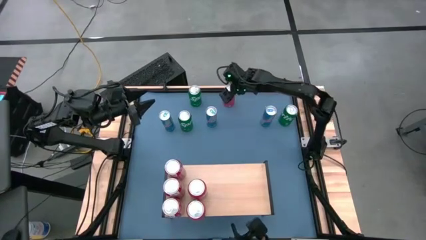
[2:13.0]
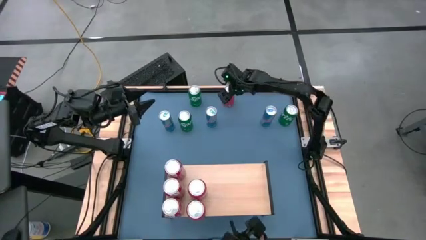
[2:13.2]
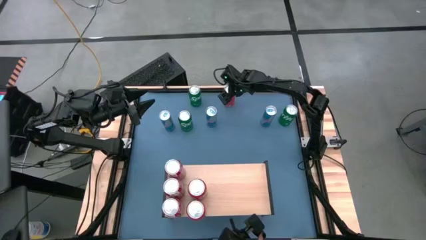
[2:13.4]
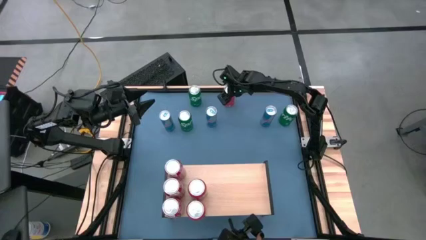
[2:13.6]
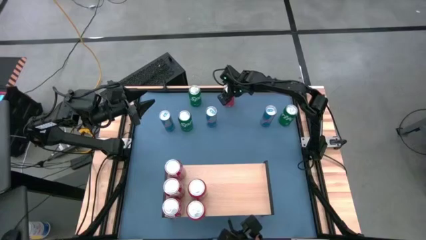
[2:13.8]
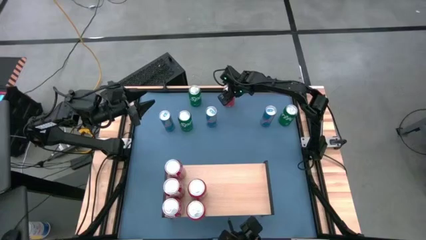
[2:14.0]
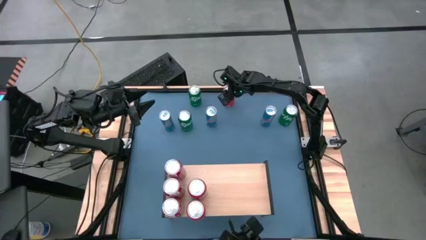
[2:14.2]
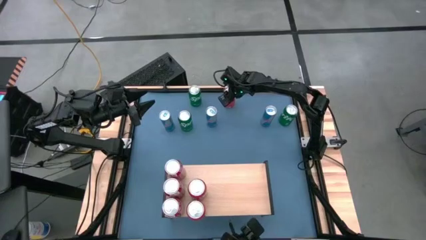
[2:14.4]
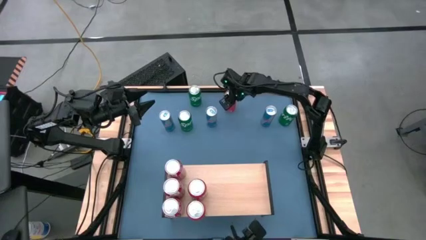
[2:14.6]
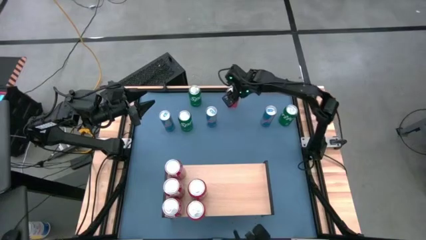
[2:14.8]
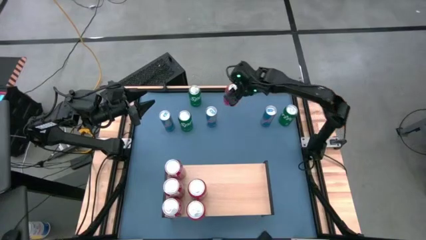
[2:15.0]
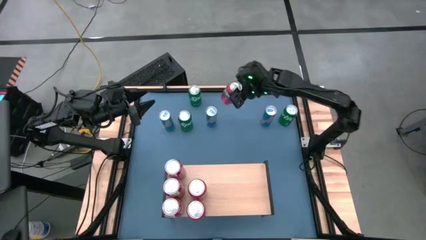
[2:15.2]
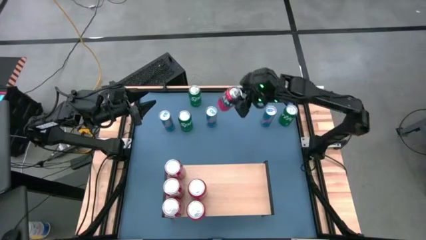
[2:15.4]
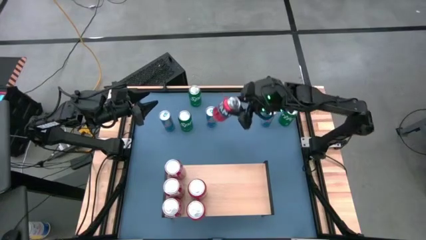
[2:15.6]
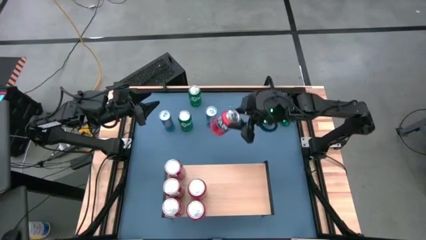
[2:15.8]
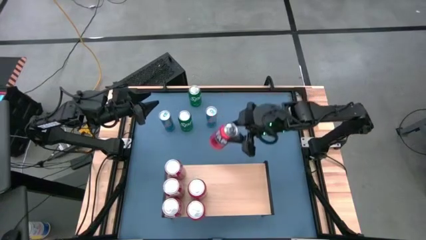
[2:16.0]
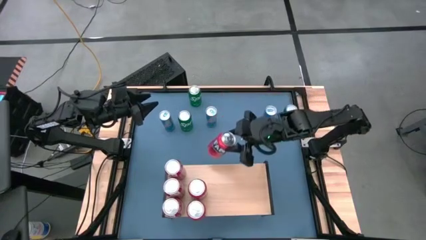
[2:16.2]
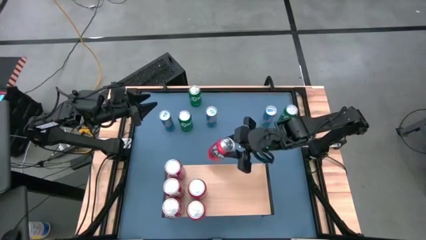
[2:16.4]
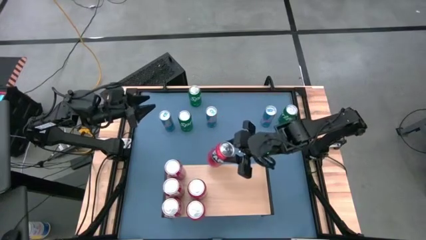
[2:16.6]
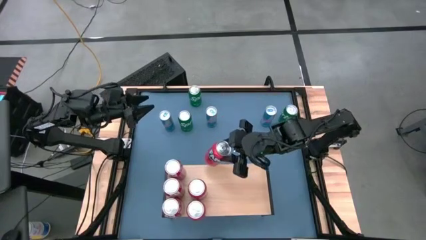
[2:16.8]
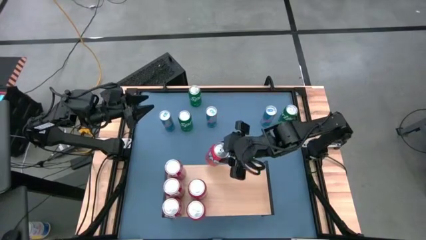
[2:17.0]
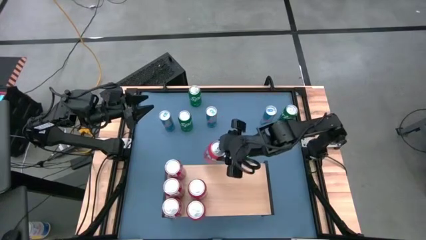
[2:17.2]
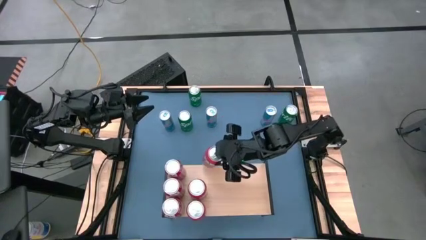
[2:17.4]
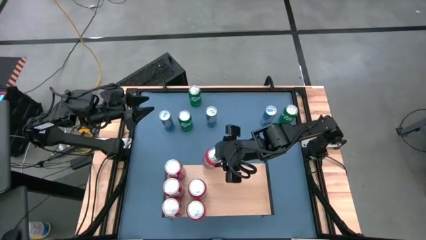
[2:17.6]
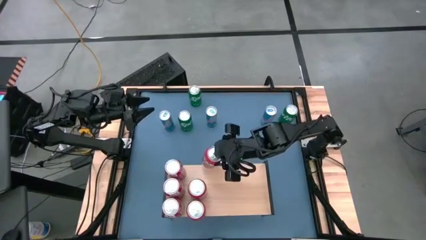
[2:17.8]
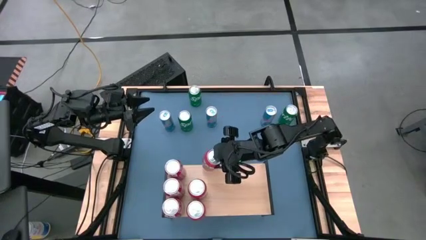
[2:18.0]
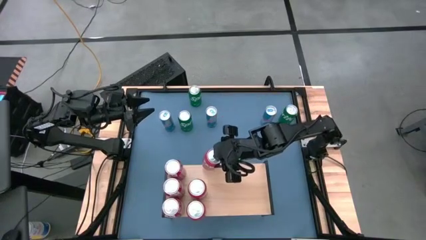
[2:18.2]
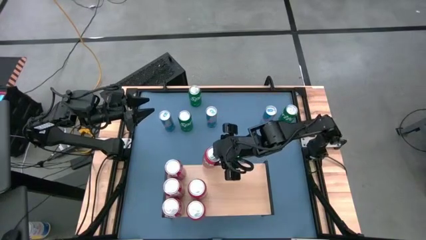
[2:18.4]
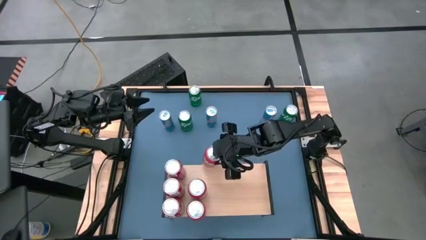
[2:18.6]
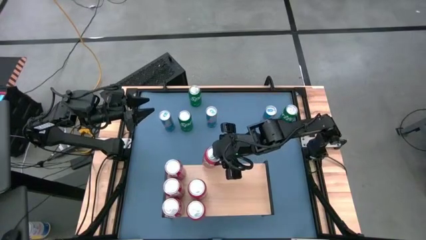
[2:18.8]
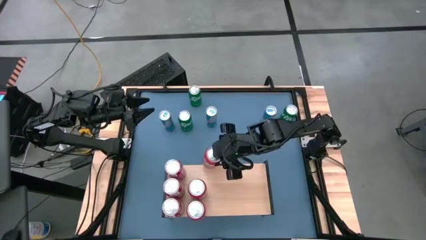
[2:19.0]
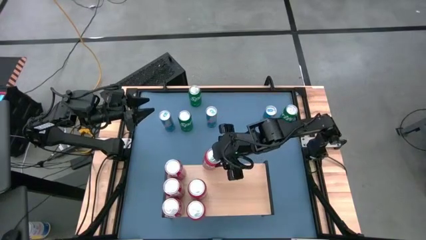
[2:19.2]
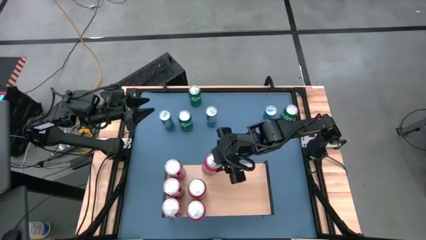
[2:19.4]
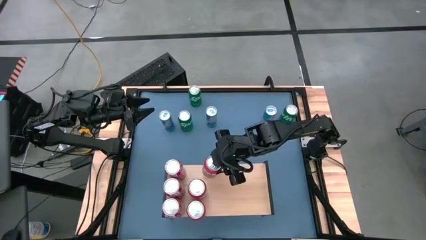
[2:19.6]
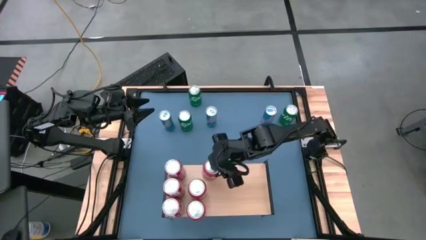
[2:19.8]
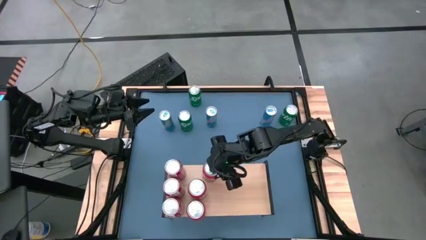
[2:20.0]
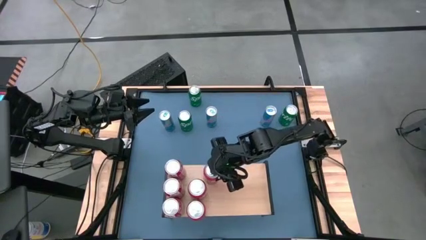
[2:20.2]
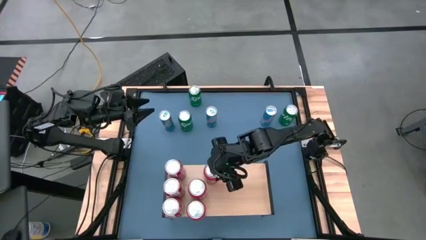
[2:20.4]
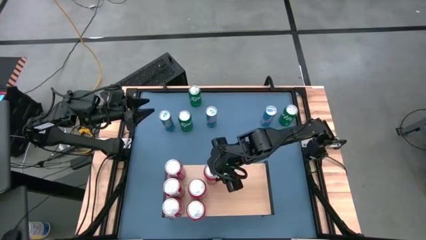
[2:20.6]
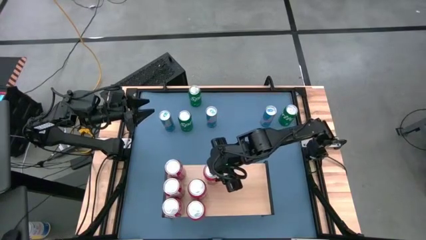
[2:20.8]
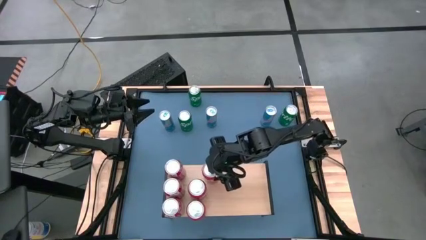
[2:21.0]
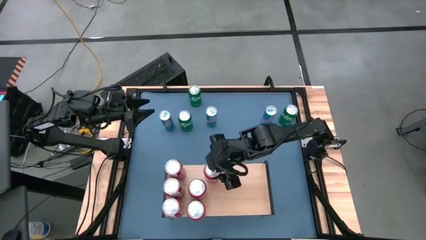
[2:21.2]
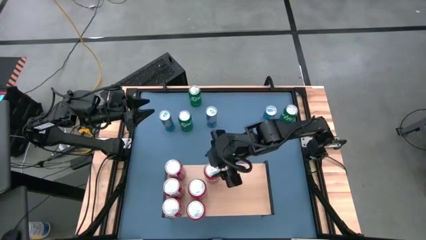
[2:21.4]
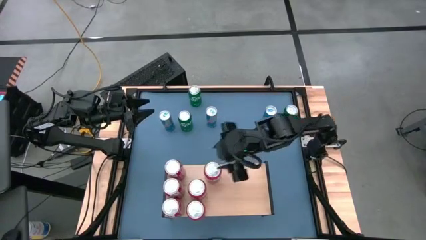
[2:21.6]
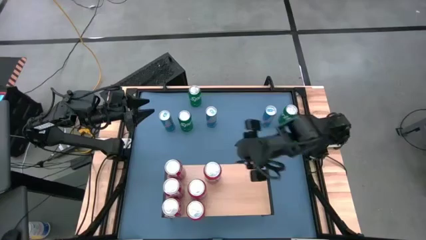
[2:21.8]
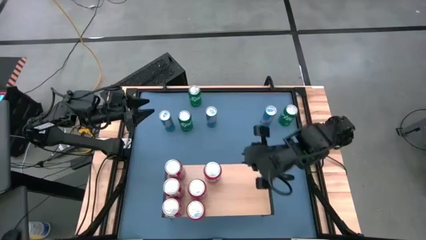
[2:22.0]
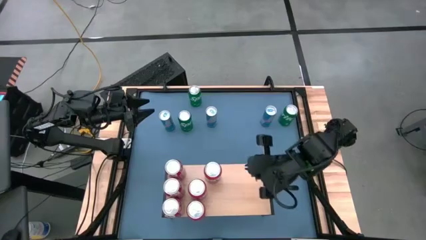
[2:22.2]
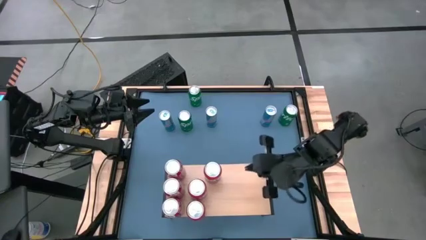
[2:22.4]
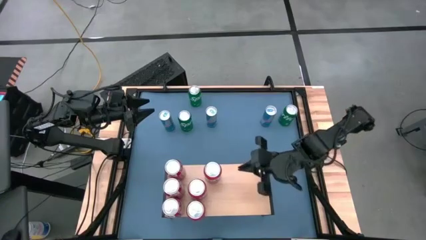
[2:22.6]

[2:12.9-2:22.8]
Task: Place canned beverage on shelf
Put the orange soda can on the shelf aligned with the other orange soda cans
